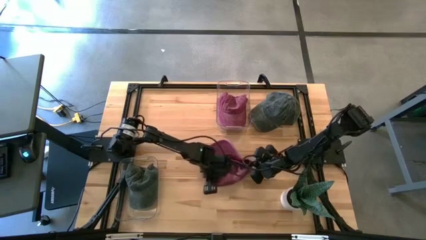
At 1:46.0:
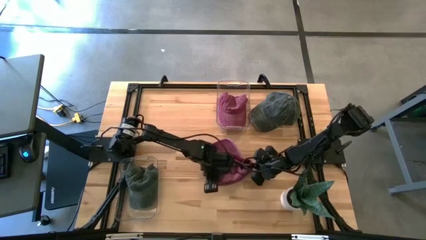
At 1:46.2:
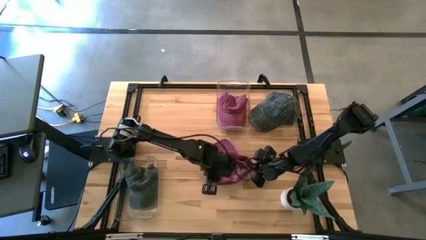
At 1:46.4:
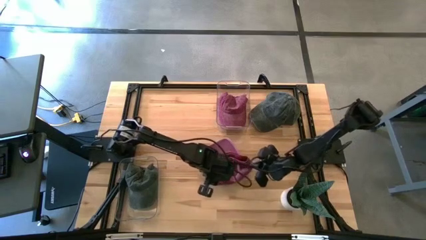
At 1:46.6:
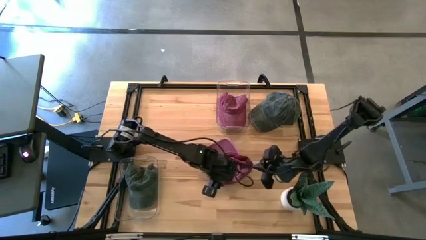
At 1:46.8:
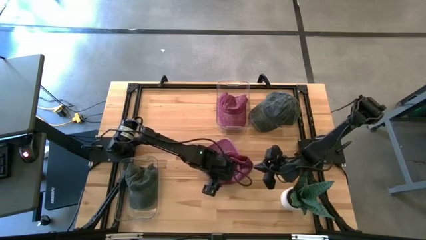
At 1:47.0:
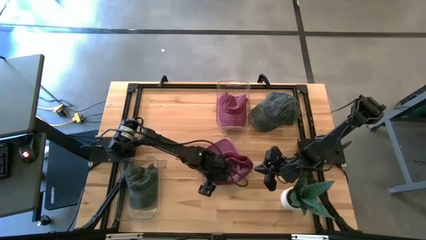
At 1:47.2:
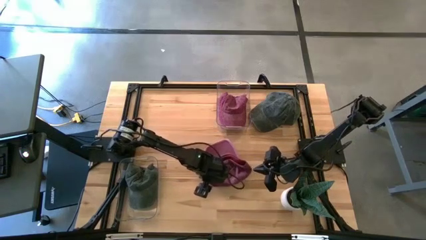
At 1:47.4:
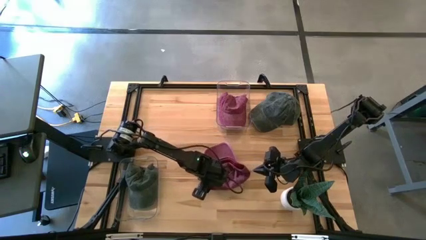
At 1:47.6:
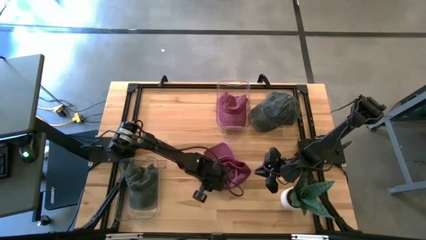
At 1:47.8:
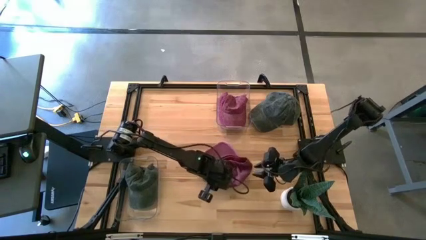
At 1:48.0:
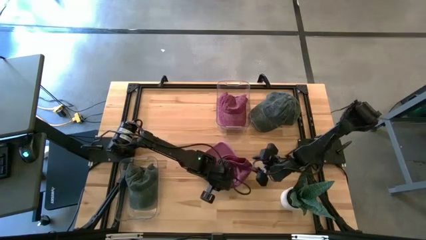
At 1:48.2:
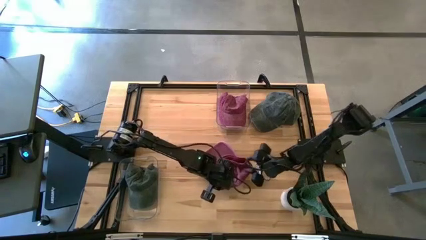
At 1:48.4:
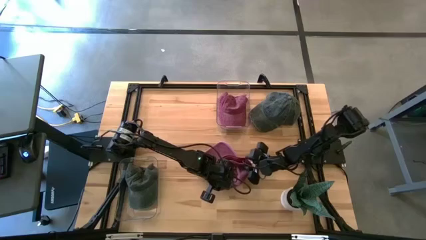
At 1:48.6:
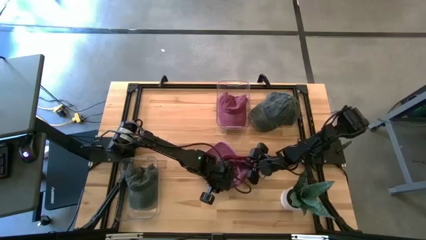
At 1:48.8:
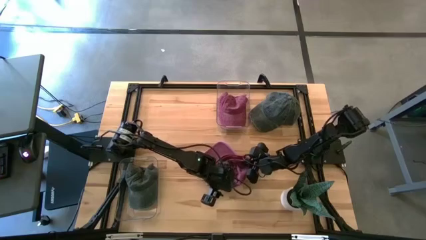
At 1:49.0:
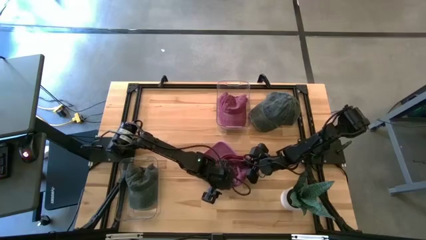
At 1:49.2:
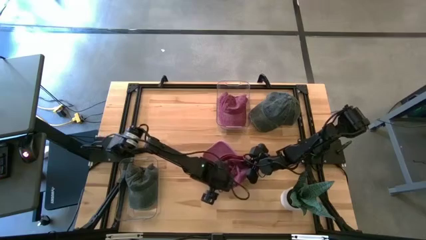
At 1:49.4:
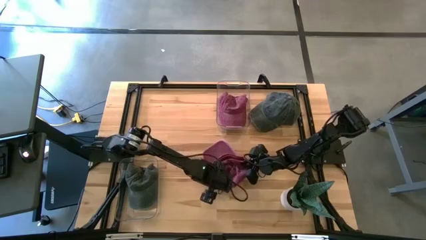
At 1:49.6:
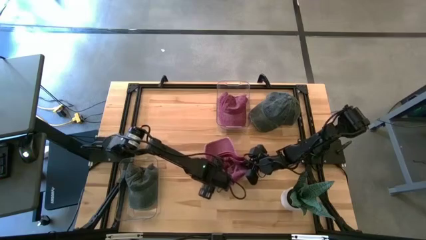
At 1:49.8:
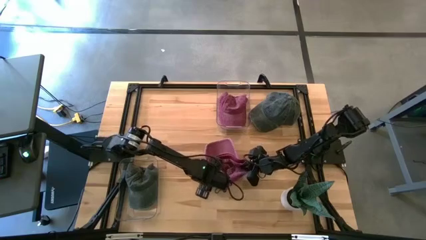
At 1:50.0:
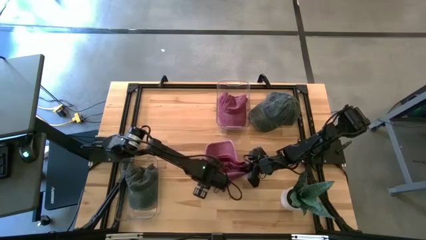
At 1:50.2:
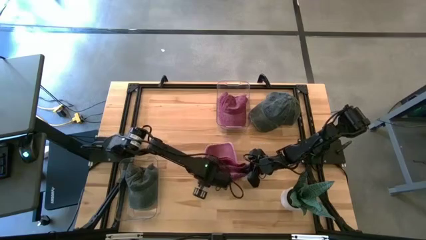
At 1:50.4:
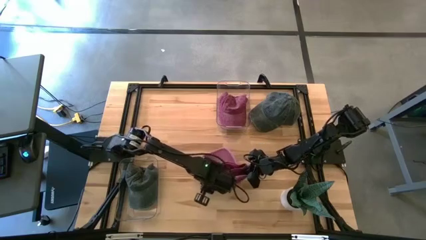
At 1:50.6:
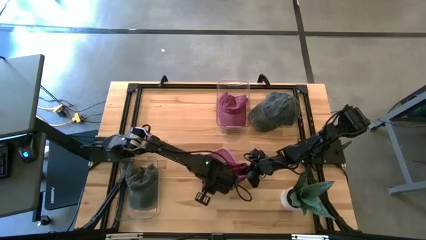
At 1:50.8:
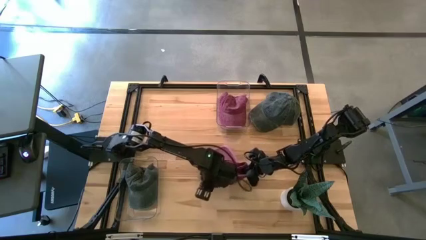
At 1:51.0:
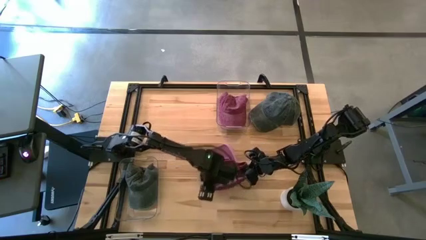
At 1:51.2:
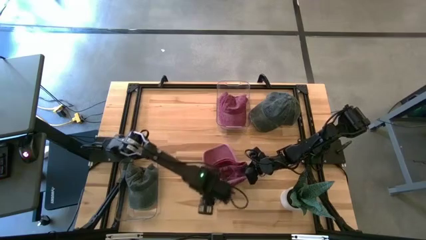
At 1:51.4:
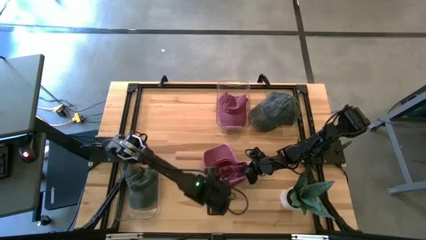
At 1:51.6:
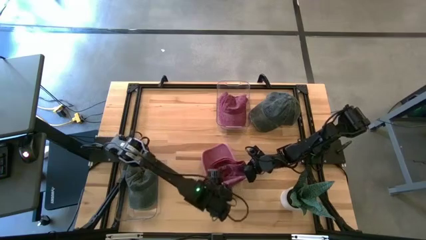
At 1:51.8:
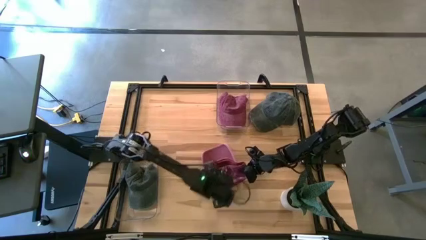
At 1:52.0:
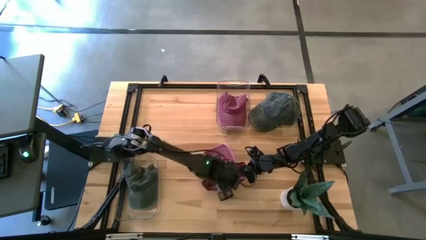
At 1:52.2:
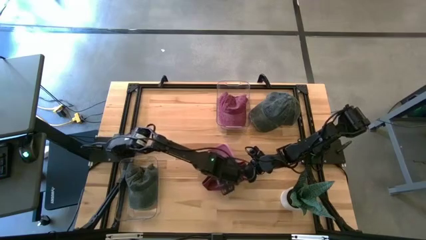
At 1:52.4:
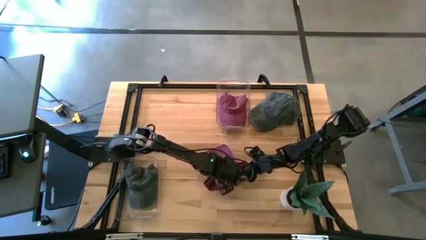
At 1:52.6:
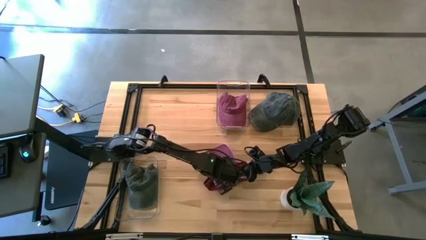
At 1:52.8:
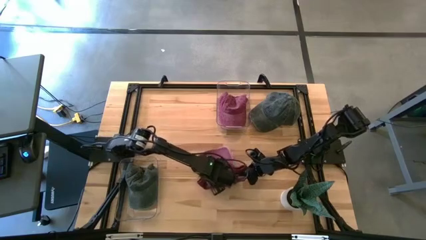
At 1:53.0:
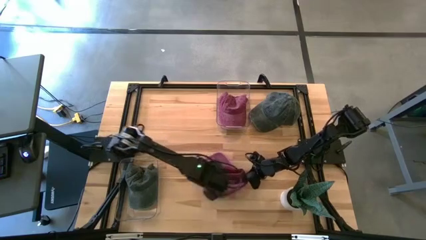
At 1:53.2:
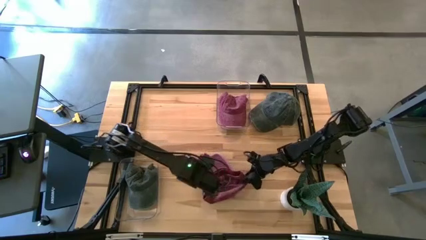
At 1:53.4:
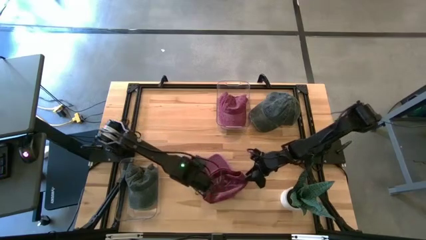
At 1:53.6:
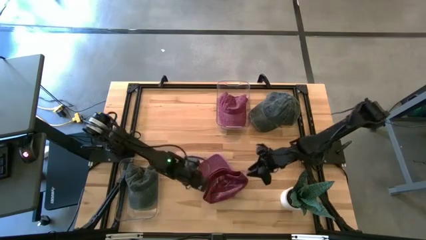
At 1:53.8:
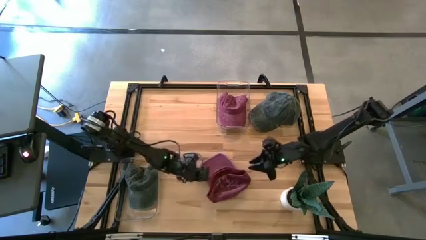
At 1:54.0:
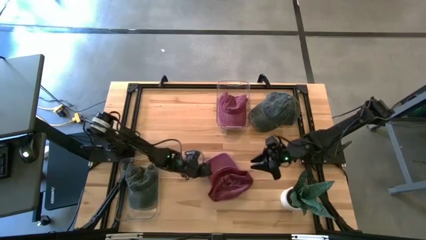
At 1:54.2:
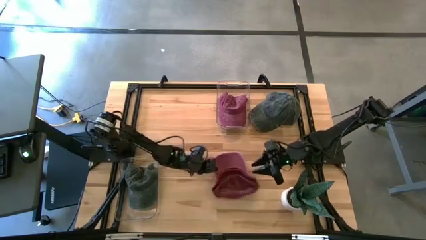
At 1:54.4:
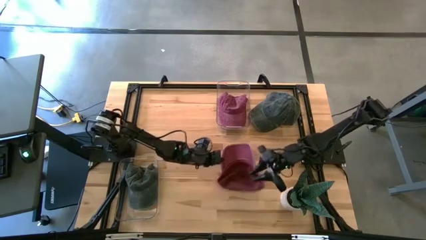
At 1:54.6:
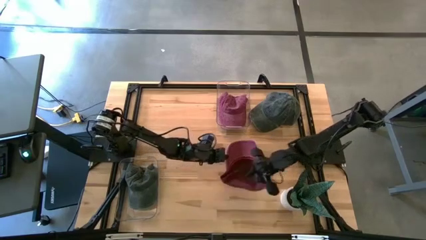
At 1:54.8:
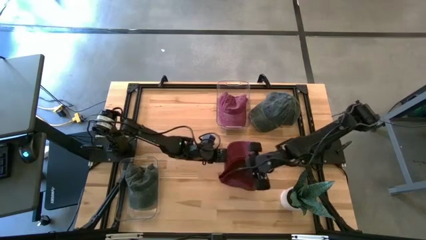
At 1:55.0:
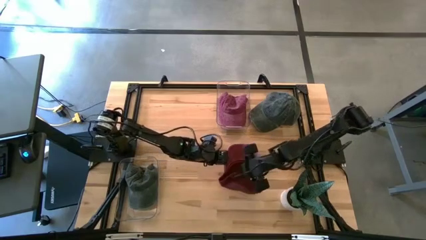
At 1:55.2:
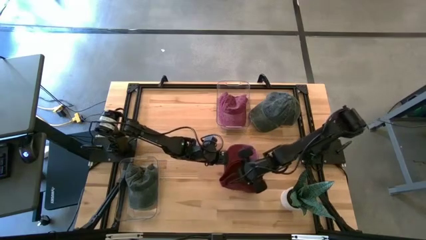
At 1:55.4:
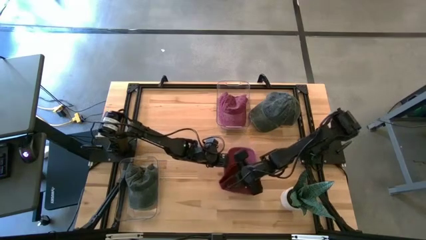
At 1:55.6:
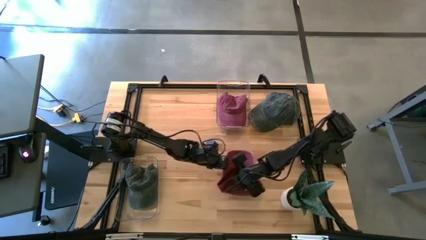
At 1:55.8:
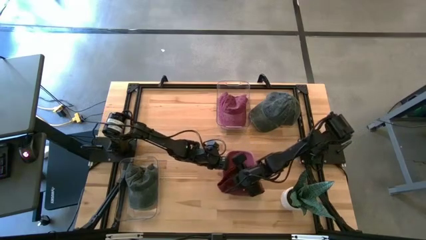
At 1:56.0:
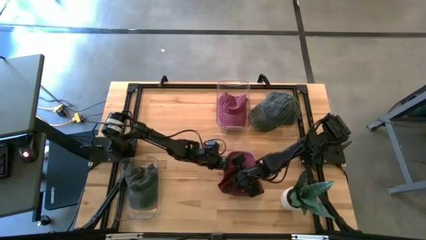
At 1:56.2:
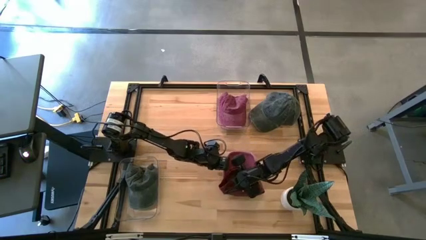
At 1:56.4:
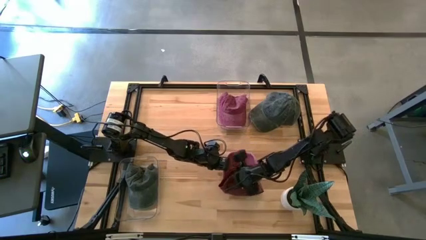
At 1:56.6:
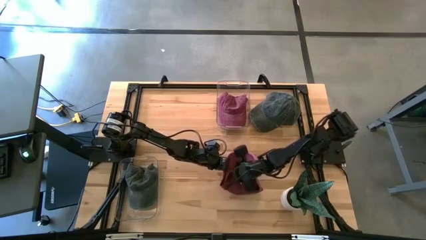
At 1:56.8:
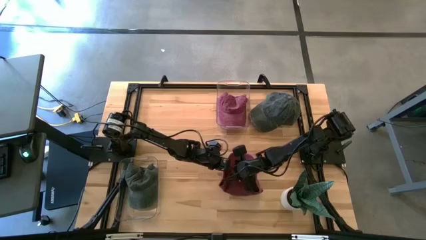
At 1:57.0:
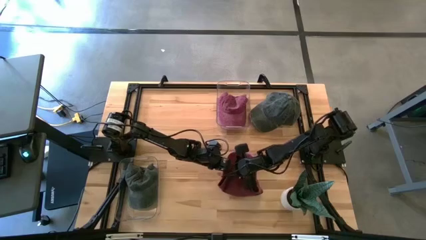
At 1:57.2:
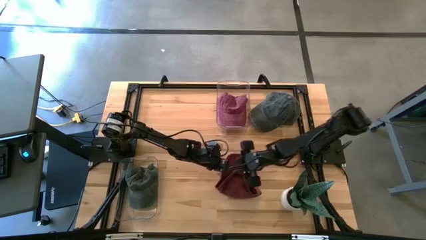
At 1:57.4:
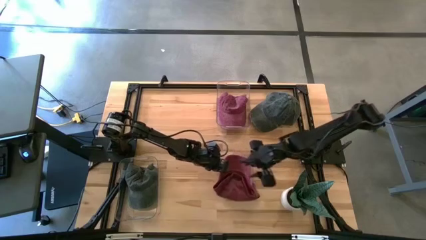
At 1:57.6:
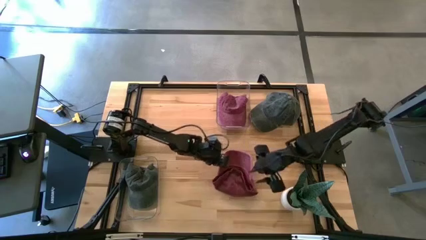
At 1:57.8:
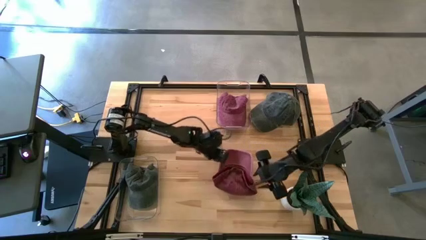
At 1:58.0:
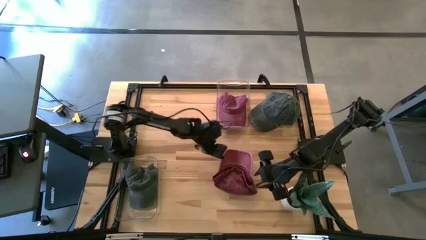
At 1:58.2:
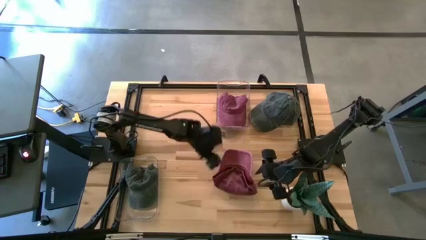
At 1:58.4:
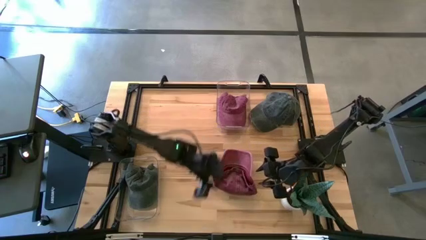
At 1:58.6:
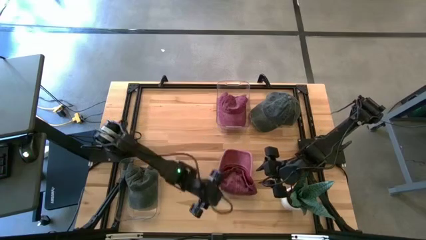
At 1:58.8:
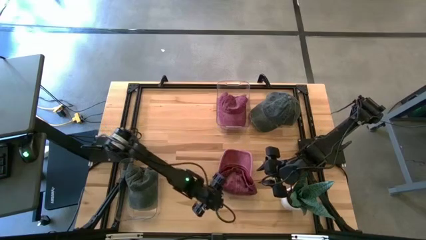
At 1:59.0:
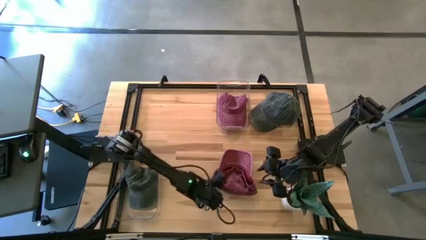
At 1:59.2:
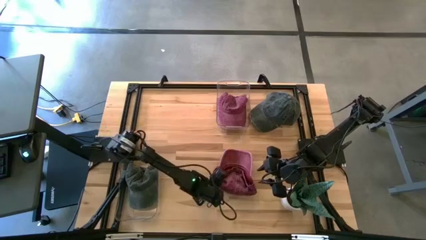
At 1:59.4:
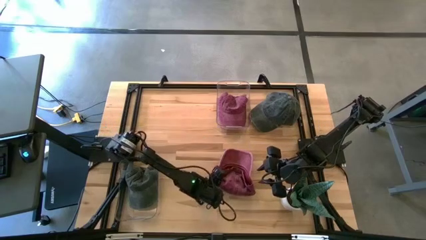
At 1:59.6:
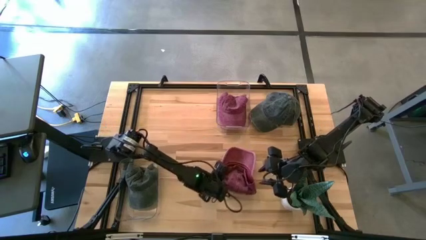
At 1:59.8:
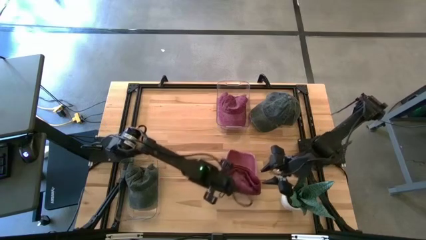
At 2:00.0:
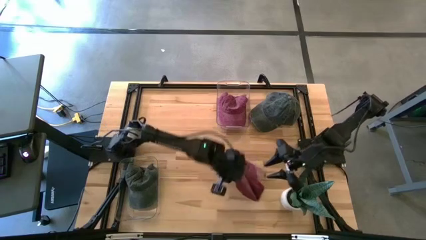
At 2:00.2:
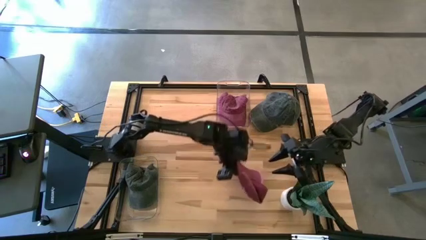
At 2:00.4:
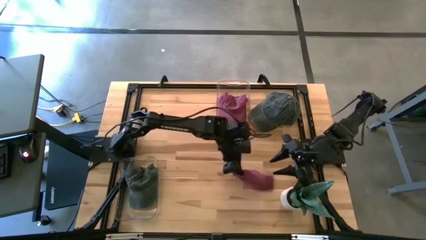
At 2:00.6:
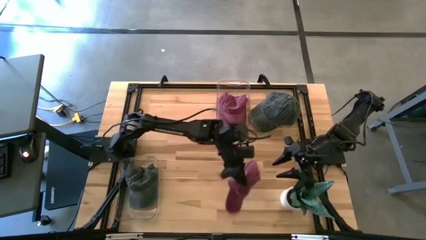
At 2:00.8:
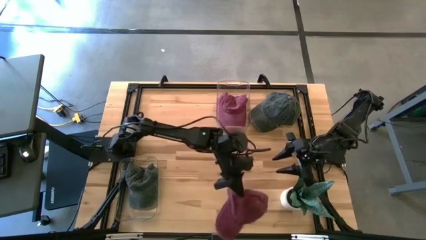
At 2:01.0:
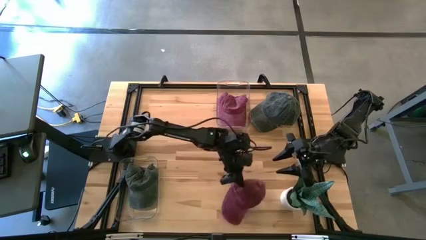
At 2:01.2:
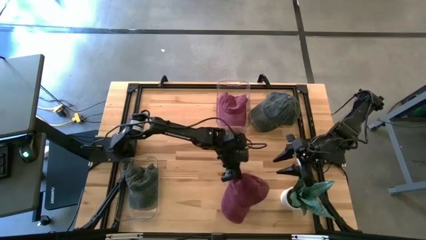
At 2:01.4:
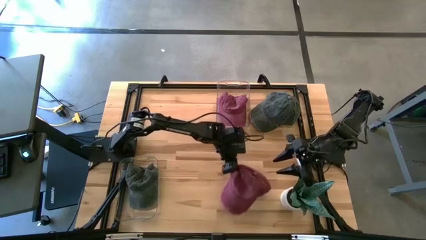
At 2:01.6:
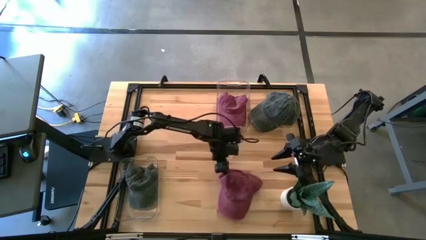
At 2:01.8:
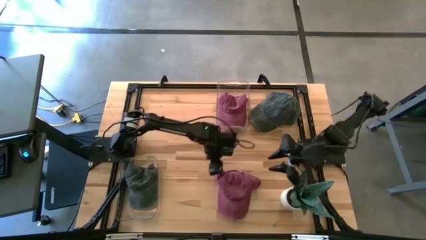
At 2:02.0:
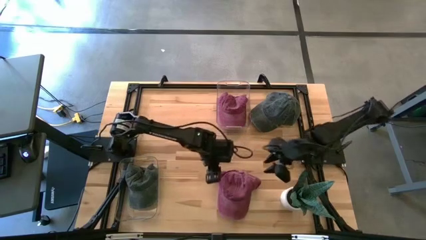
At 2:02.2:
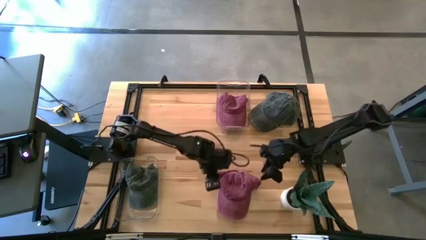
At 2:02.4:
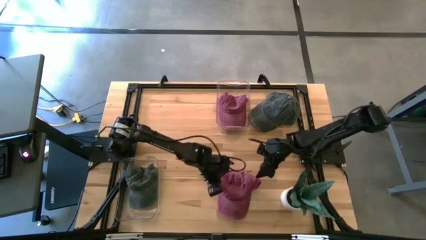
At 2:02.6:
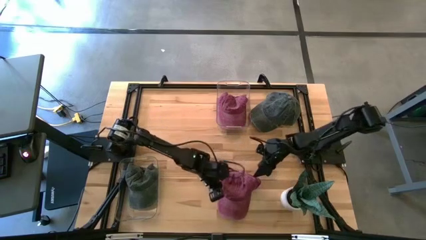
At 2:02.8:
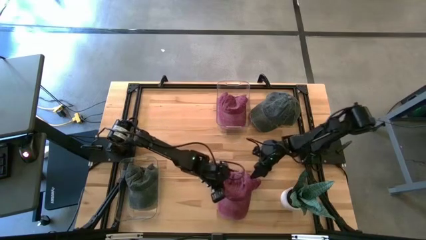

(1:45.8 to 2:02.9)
Task: Pick & Place hat
Put the maroon cap into the top transparent bin
